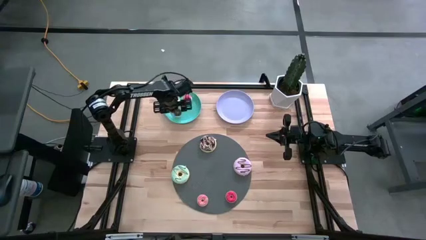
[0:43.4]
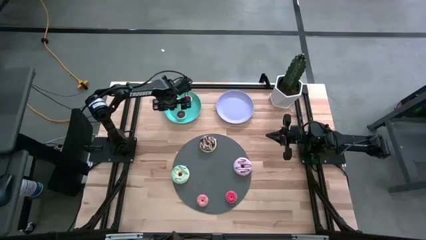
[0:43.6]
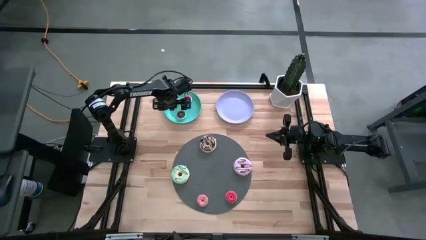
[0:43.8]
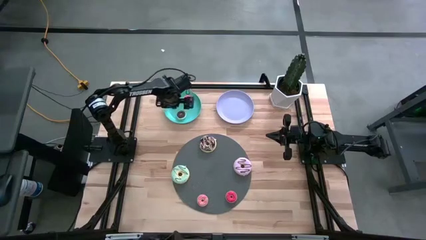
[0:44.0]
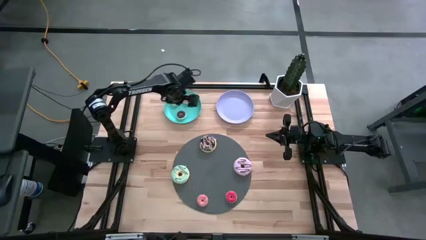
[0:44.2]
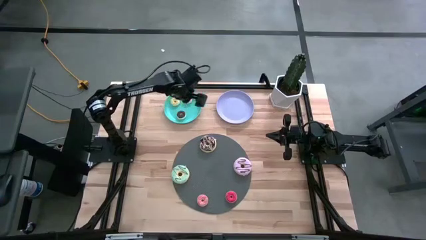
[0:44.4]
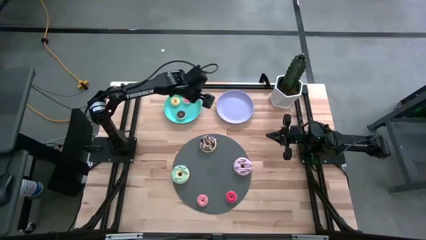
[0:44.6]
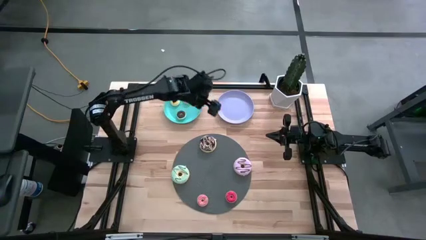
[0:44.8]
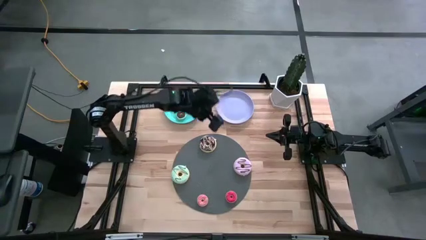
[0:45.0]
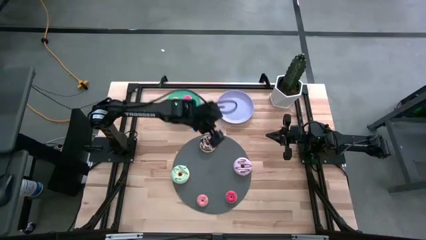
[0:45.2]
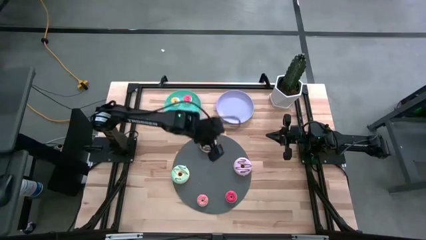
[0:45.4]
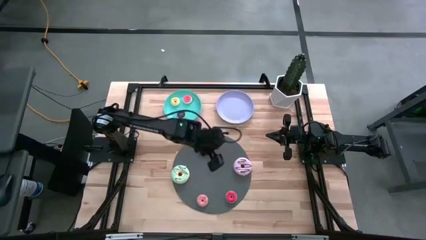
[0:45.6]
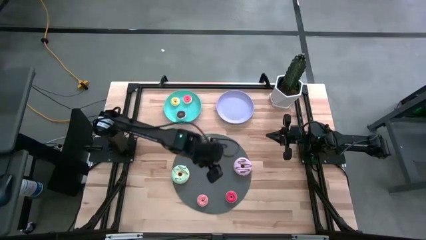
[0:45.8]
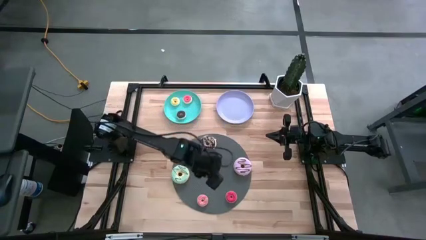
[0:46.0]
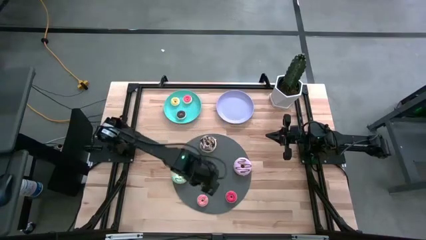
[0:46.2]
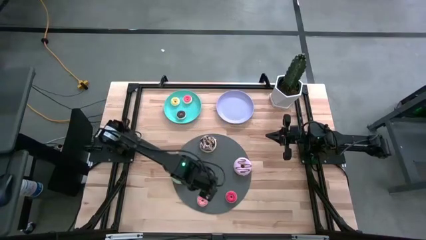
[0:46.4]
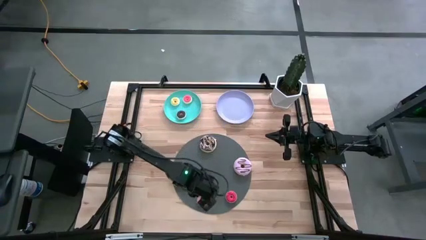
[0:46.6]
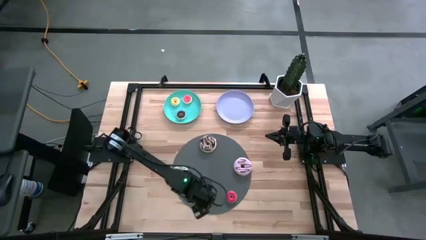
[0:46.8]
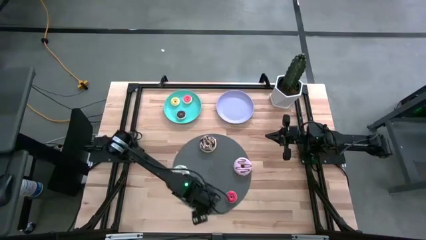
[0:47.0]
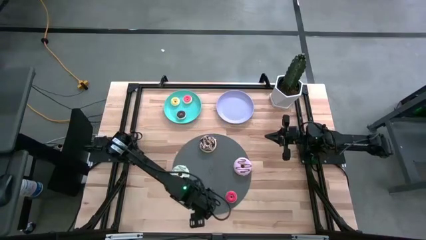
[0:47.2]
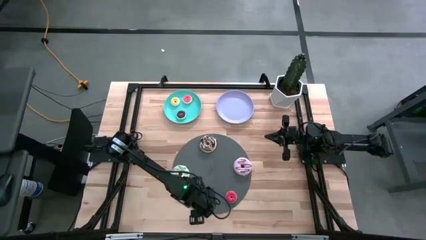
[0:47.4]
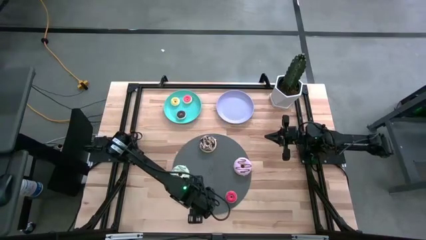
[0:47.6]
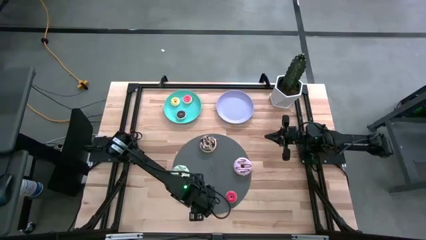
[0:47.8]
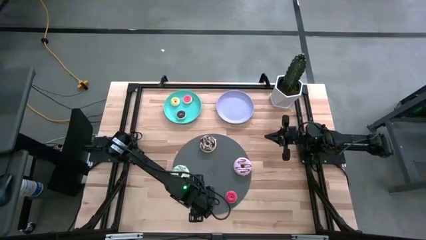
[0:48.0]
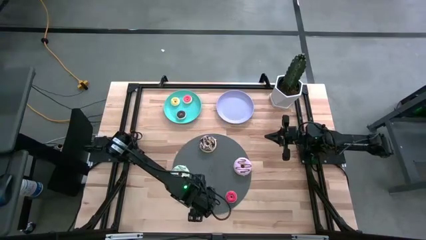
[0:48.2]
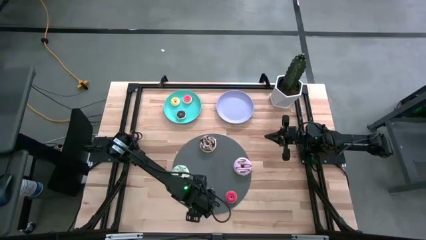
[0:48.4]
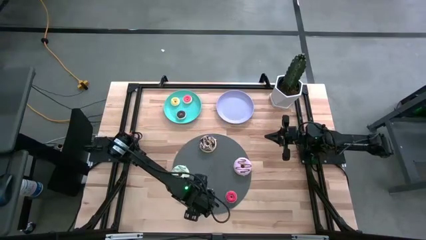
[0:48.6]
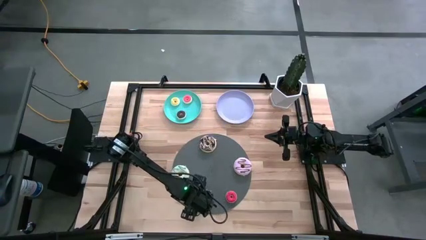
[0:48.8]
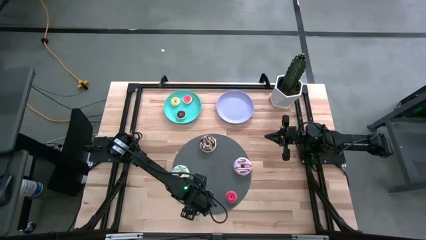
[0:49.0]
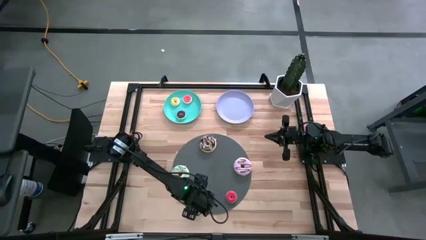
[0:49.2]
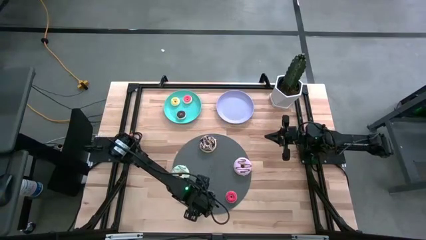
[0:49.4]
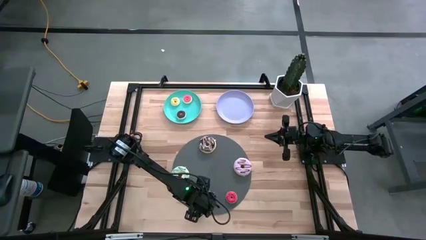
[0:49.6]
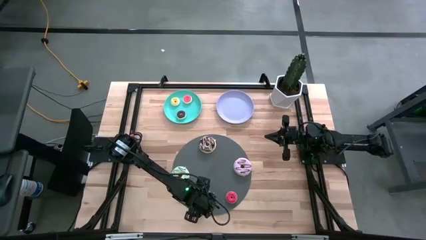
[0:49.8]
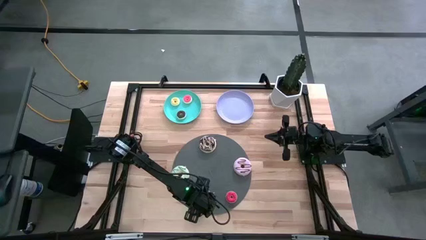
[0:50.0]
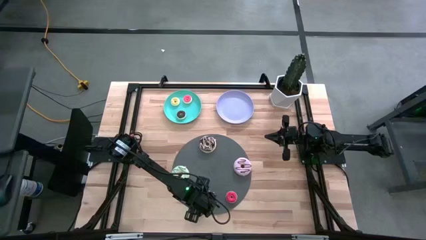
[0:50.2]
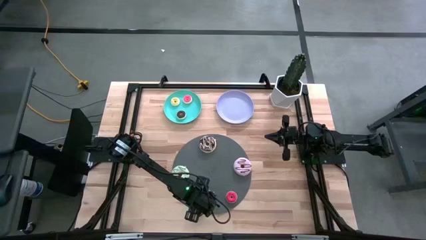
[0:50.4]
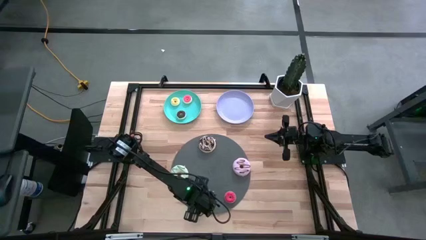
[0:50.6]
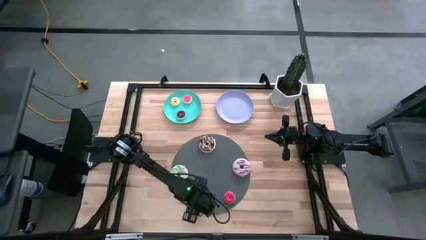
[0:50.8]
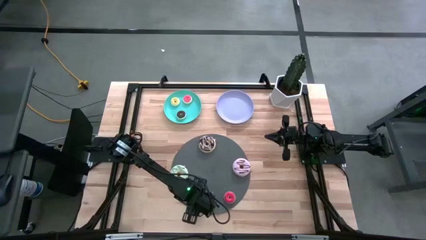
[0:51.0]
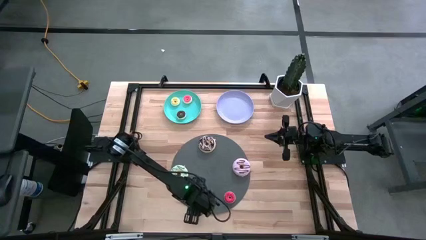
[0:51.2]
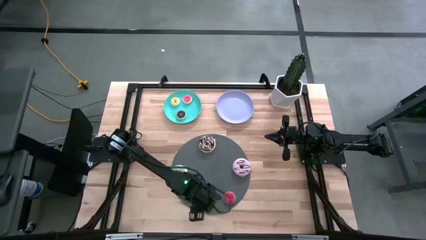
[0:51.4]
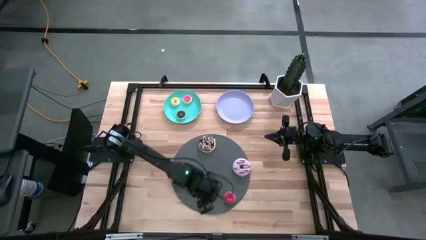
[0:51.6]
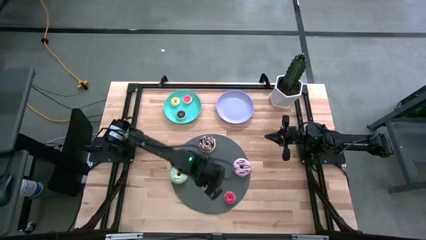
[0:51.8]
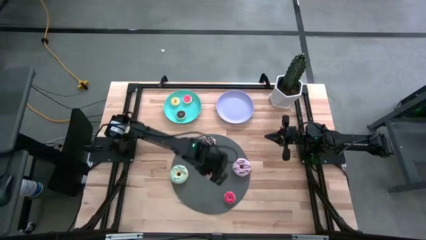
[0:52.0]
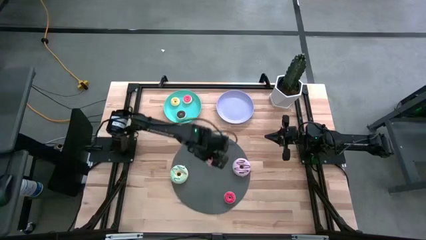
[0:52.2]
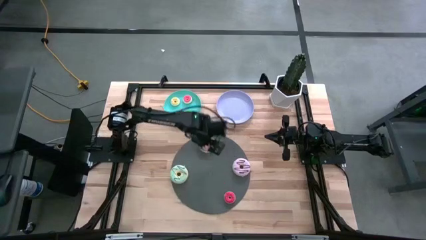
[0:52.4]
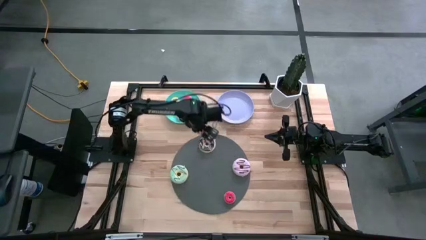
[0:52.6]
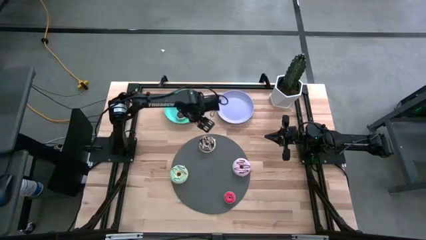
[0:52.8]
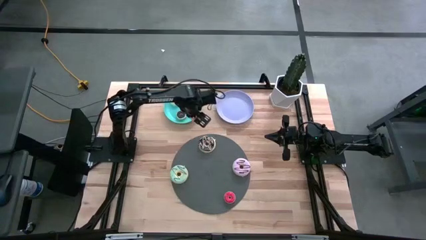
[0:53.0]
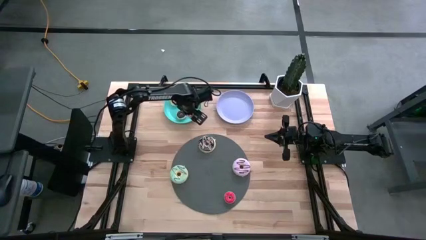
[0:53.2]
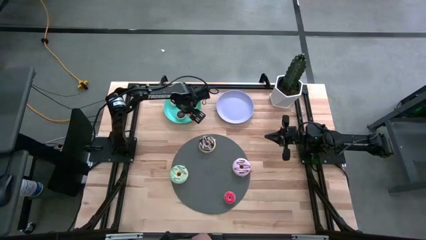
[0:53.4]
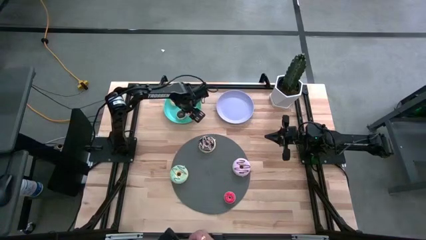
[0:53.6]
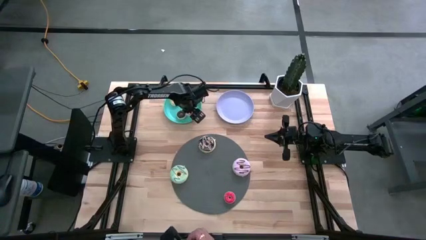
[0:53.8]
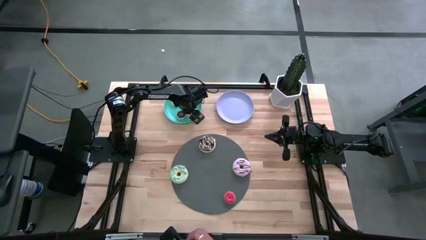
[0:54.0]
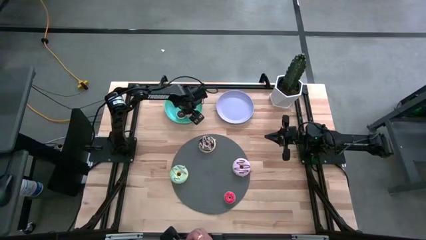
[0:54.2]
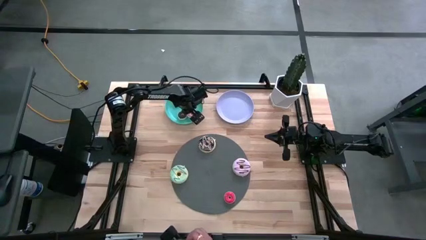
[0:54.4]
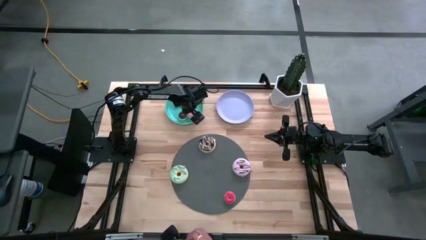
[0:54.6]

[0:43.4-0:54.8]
Task: Pick & Place donuts
Put the small pink donut on the green plate

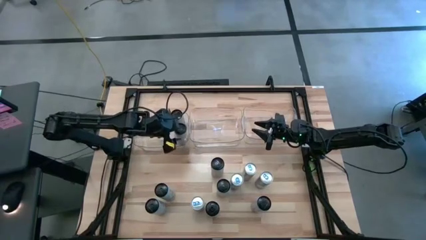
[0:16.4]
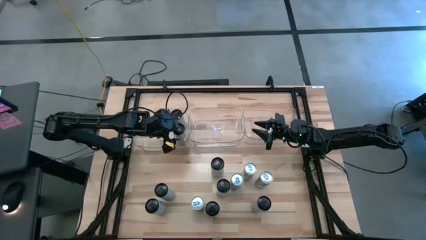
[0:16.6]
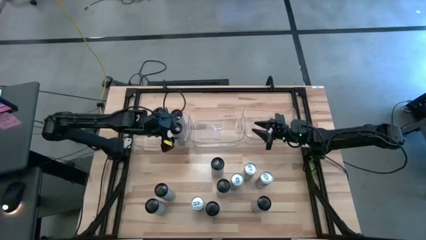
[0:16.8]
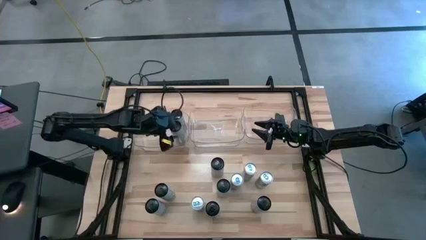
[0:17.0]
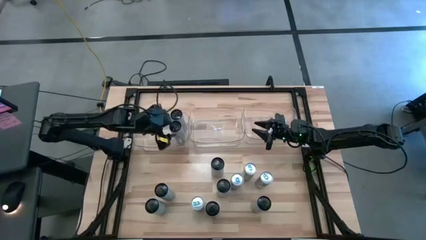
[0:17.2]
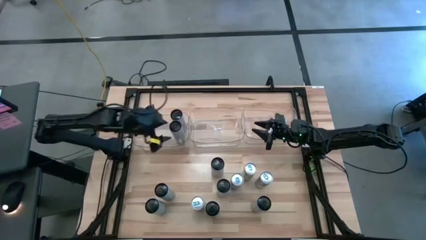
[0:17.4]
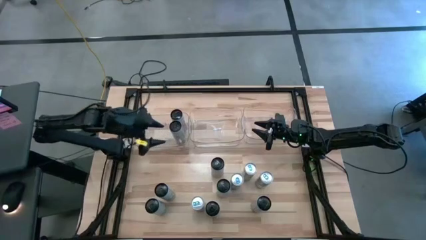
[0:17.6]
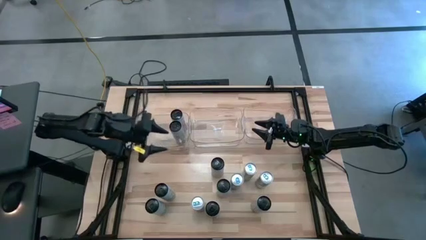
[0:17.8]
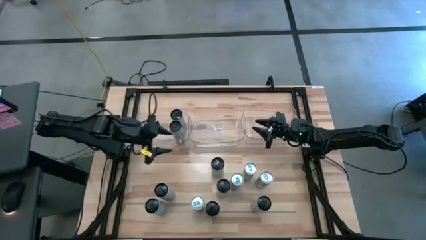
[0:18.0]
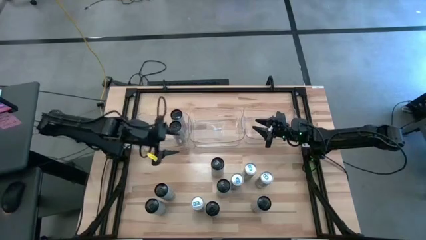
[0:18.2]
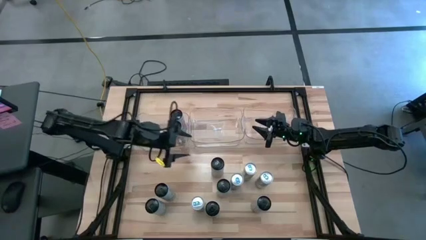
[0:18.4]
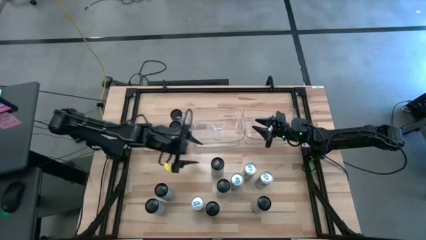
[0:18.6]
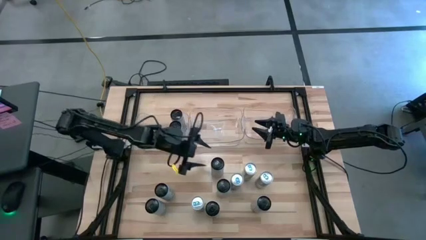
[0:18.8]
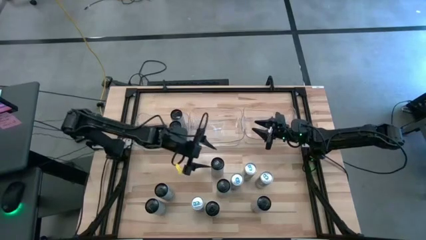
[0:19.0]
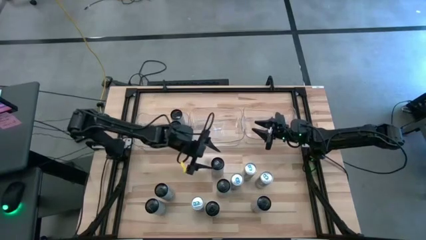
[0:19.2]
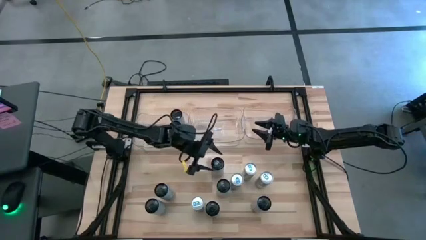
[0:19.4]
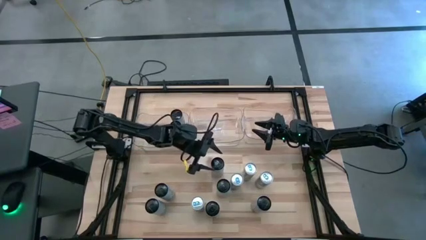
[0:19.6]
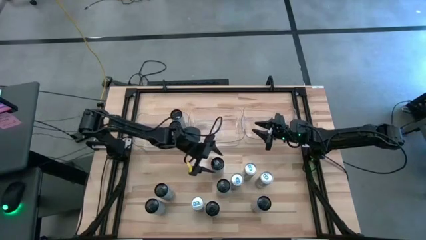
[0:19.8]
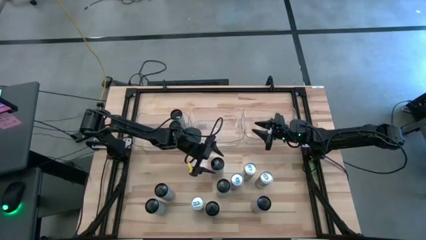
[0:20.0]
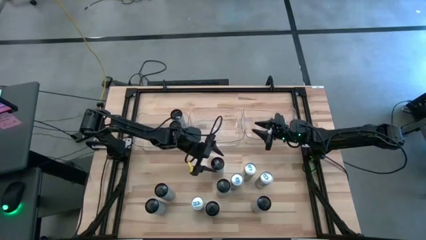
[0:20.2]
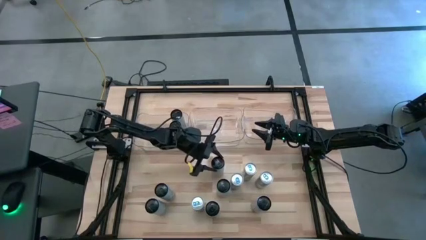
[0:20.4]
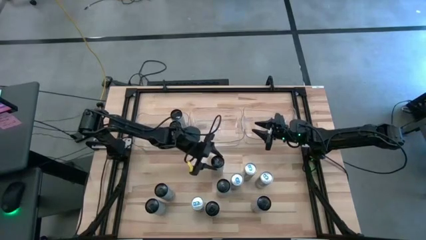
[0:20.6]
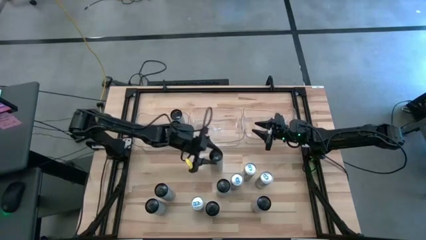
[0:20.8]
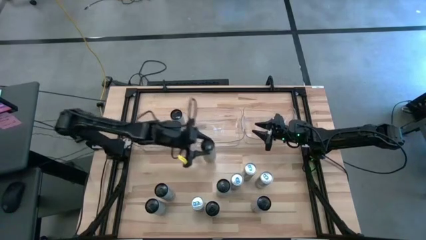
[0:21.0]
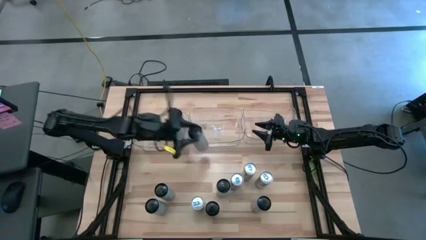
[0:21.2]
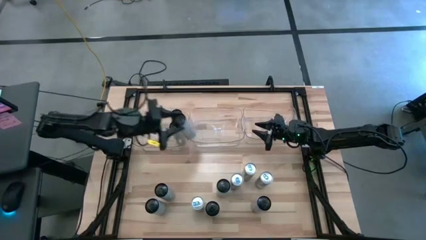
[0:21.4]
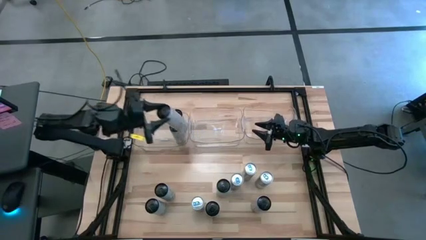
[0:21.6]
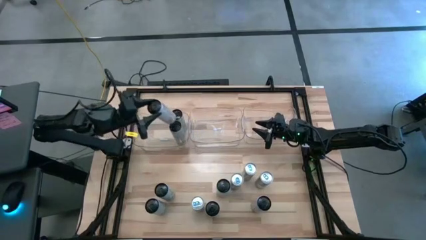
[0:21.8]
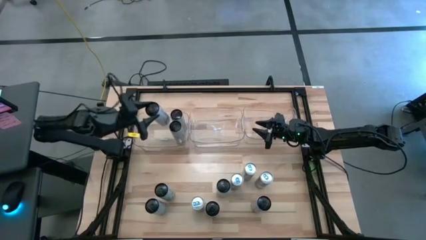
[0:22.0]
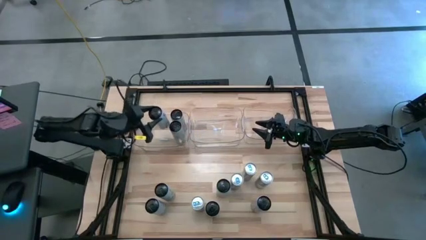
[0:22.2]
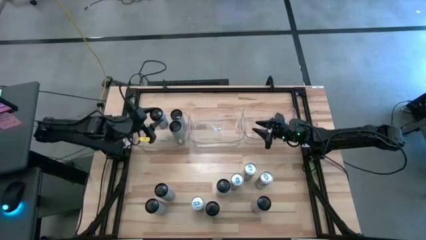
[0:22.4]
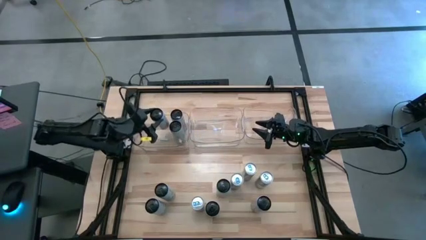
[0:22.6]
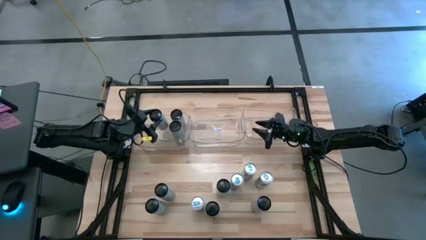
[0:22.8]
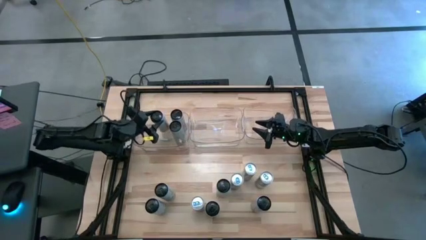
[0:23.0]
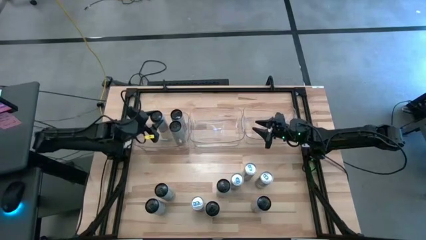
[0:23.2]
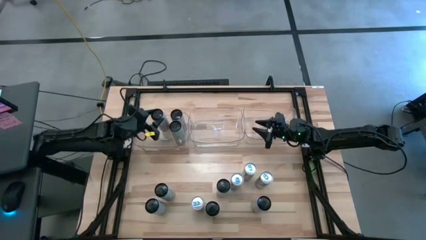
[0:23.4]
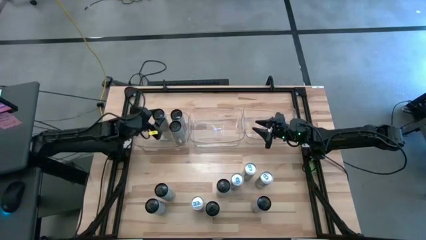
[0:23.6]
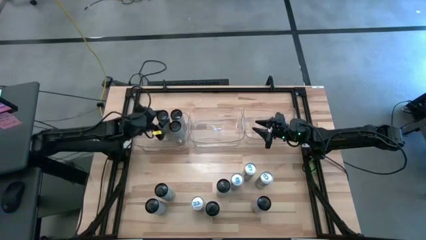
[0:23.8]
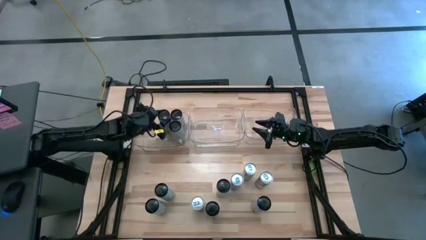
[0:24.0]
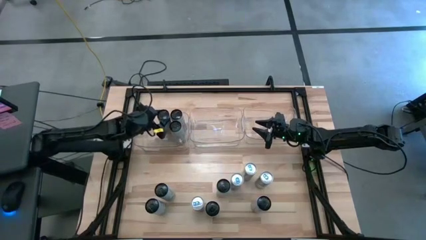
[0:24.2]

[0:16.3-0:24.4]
Task: Sort soda cans
Put the green soda can into the left transparent bin
